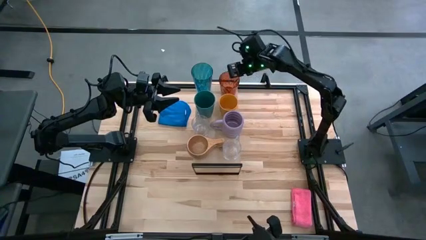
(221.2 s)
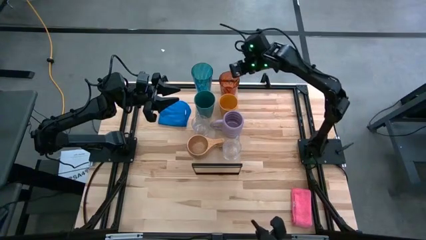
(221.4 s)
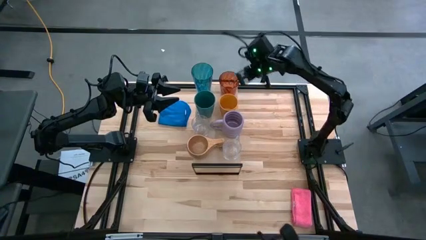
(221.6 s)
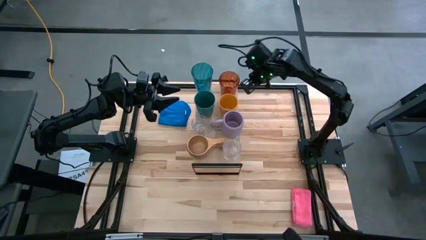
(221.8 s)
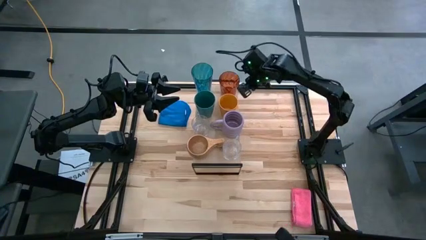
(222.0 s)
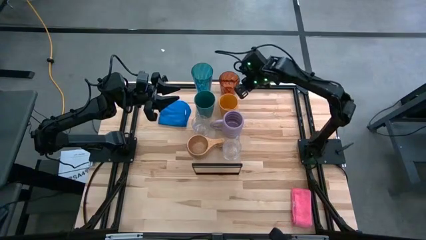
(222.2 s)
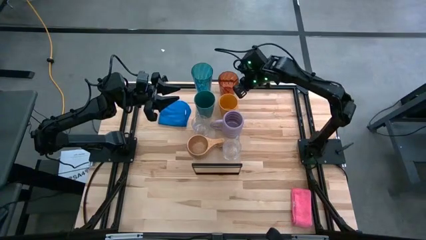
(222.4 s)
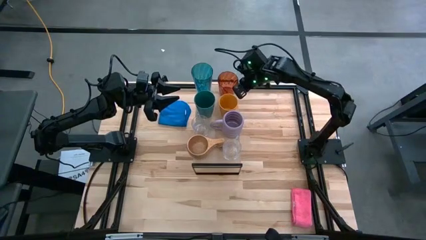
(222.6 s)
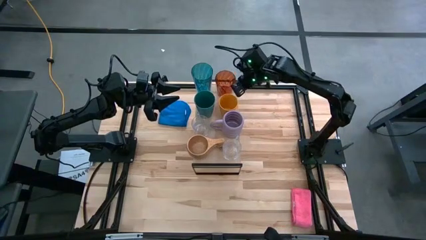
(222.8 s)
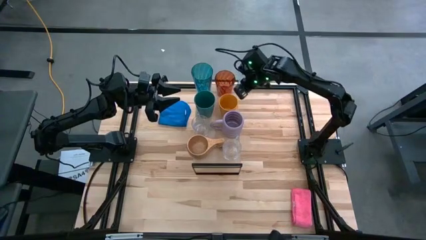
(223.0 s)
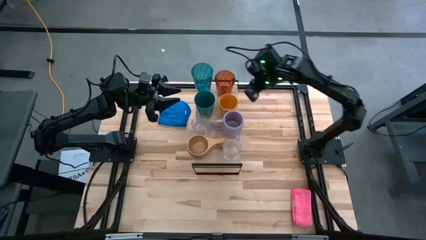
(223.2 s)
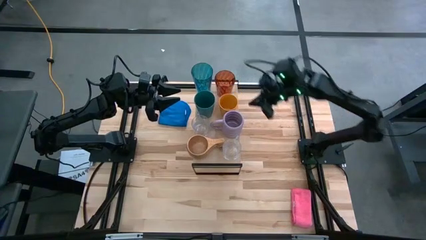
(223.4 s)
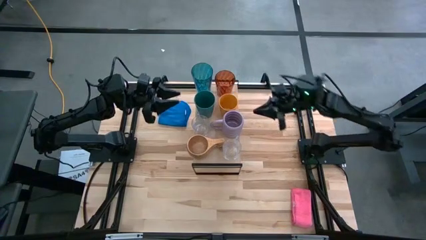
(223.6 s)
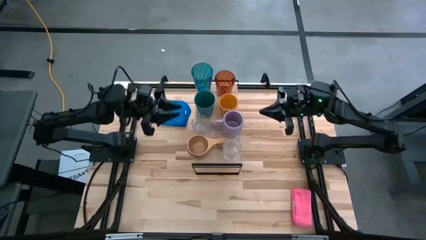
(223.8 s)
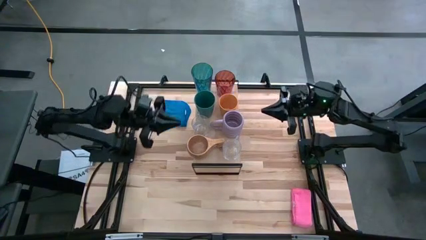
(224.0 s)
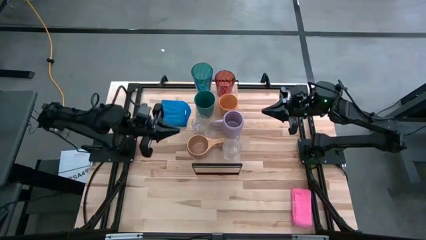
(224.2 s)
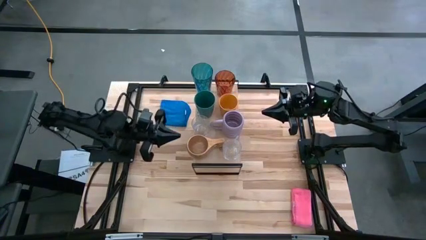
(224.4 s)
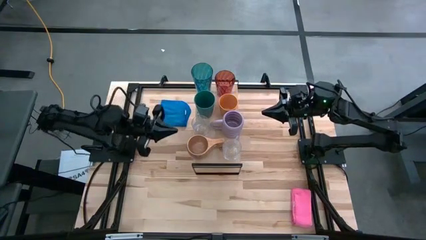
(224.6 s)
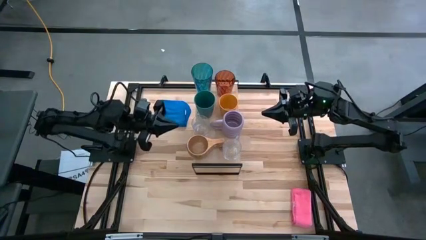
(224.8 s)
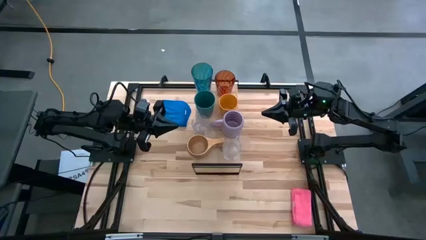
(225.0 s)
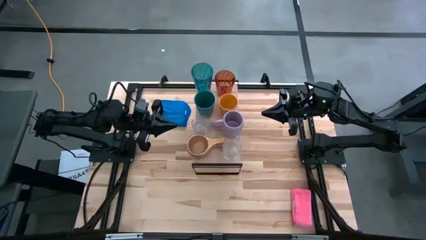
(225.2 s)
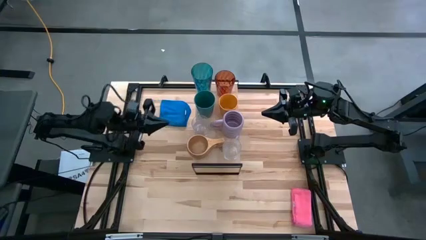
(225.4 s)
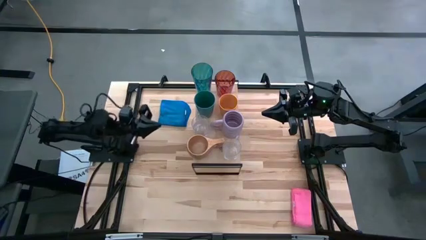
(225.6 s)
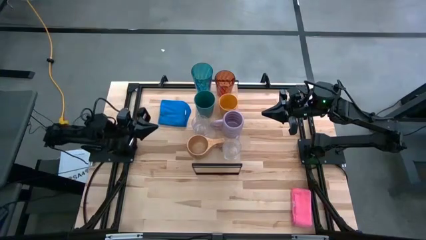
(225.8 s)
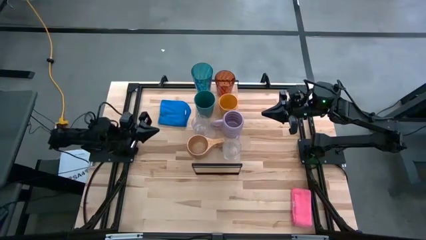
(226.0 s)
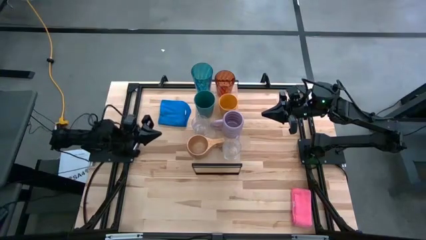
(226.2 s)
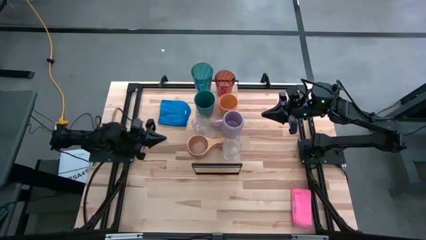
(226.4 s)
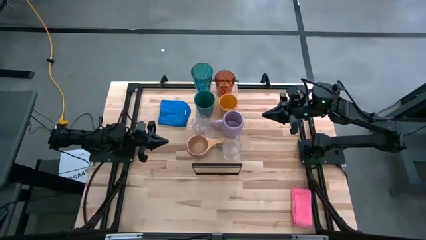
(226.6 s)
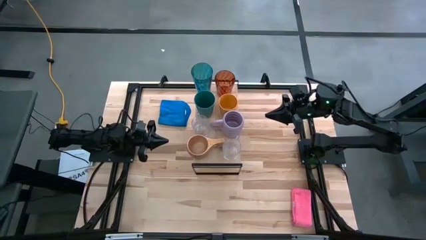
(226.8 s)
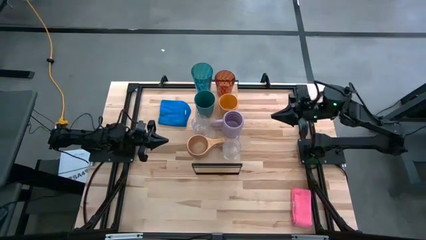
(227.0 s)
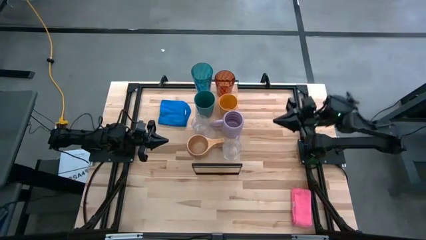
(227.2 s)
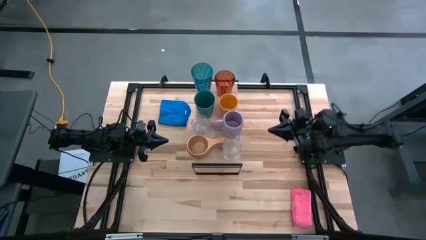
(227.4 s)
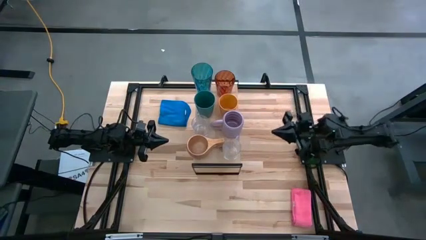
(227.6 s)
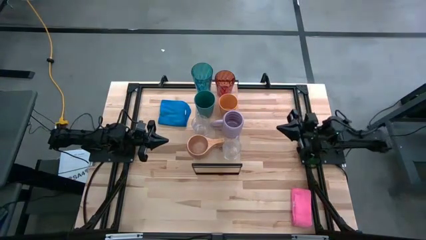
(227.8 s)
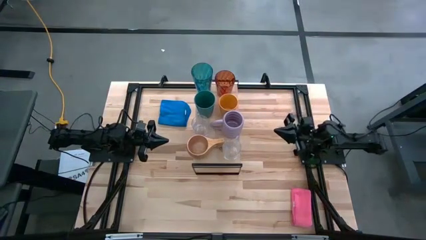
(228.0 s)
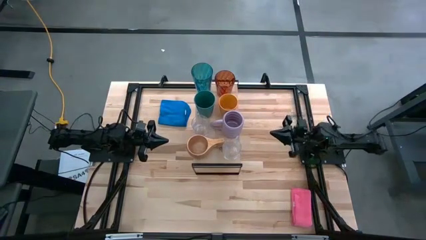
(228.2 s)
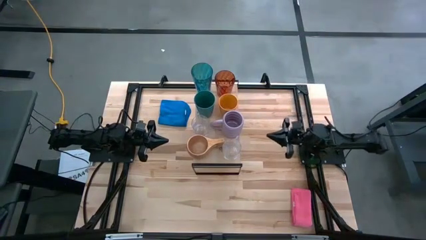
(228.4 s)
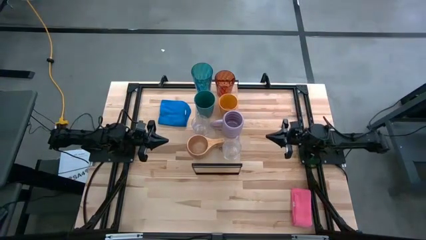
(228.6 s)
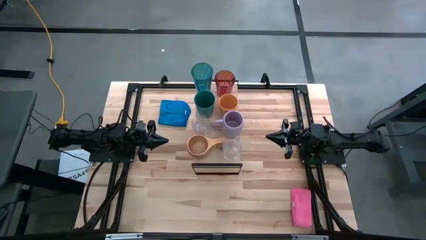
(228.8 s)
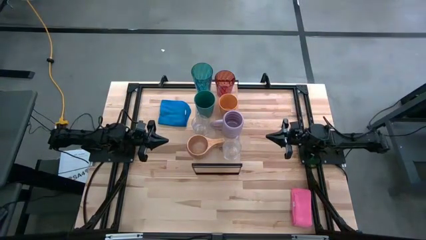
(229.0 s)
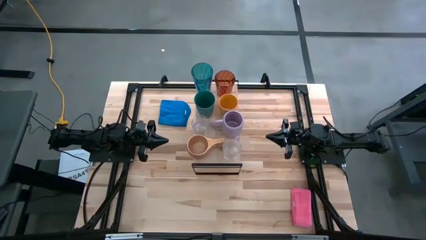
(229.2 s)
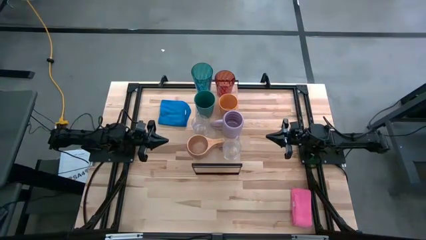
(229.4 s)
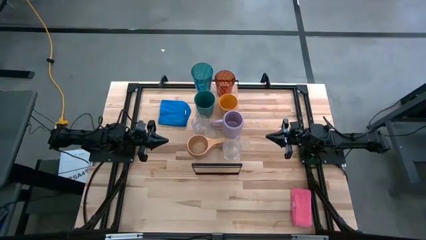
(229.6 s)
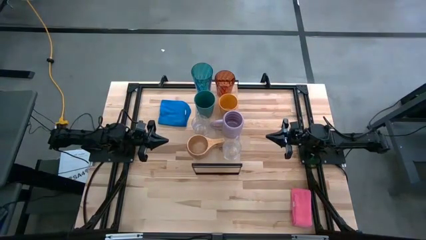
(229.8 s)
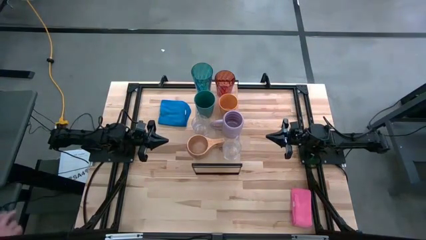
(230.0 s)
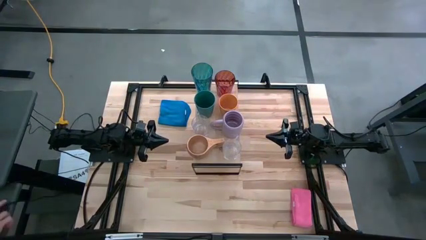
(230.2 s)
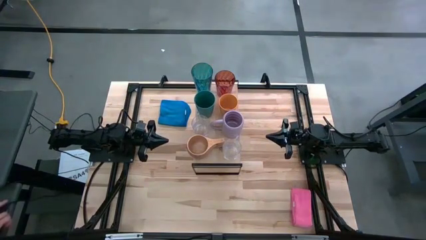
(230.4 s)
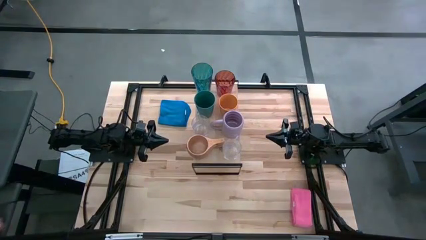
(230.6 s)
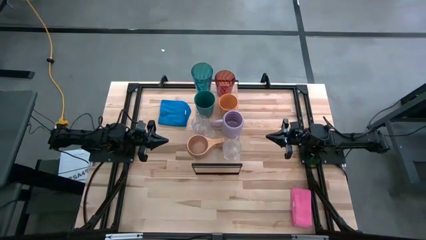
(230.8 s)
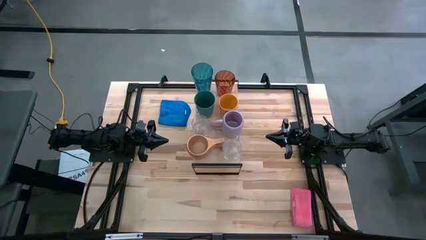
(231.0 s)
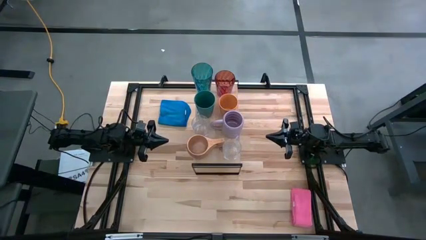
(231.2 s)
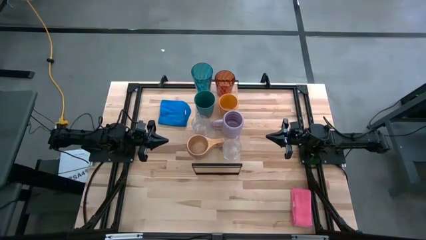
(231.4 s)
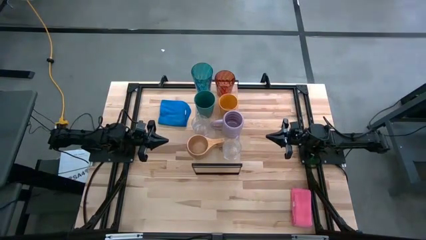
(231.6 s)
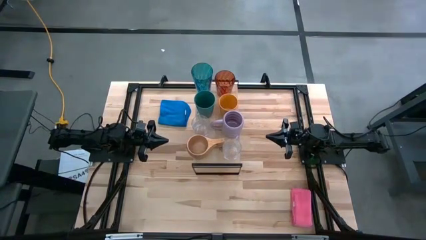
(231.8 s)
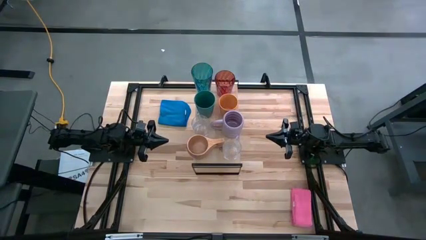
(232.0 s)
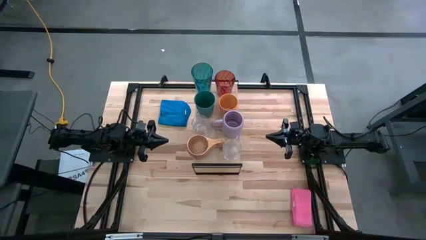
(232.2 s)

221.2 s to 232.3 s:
Task: Stack small to large cups/mugs on shelf
Return to Home Position

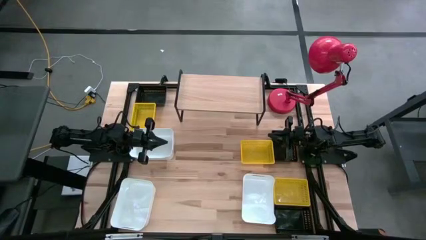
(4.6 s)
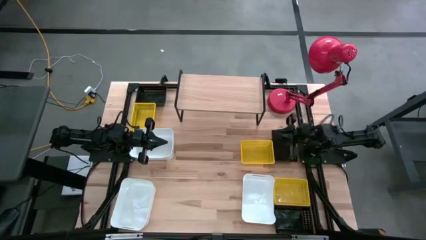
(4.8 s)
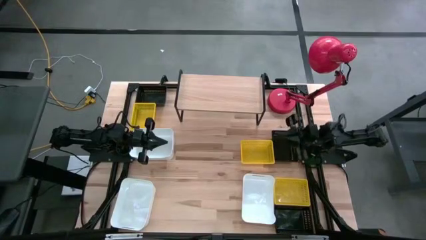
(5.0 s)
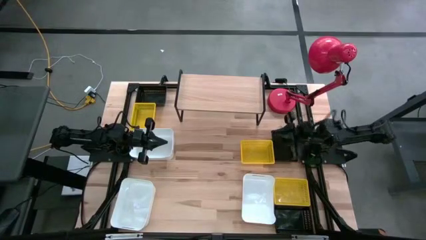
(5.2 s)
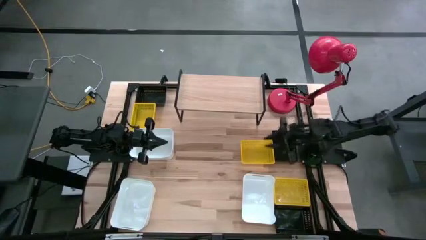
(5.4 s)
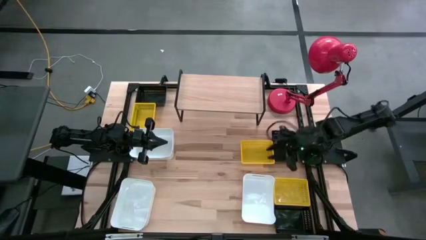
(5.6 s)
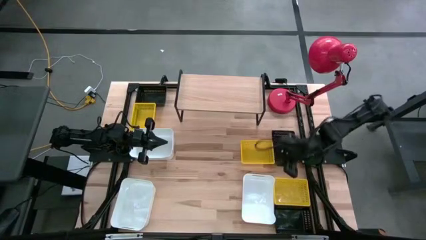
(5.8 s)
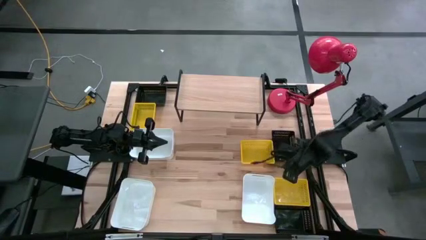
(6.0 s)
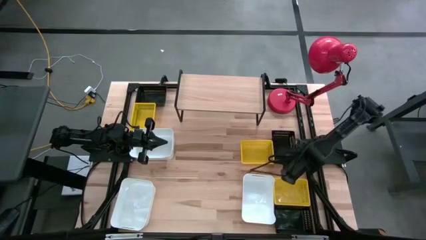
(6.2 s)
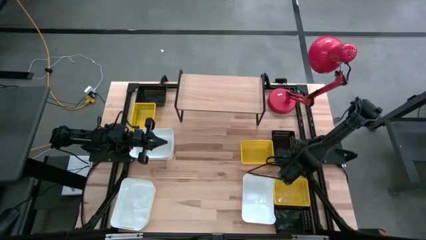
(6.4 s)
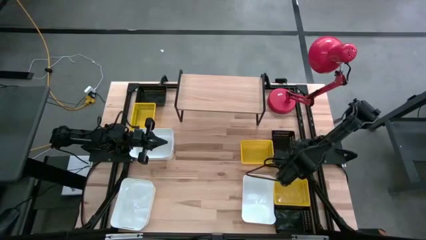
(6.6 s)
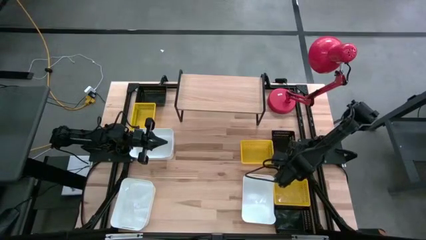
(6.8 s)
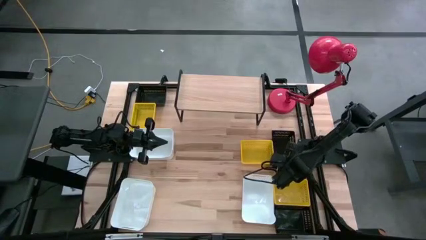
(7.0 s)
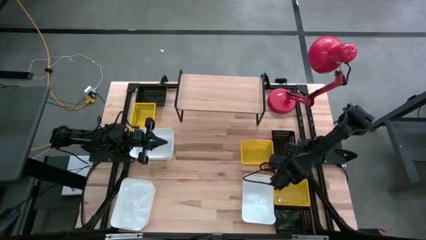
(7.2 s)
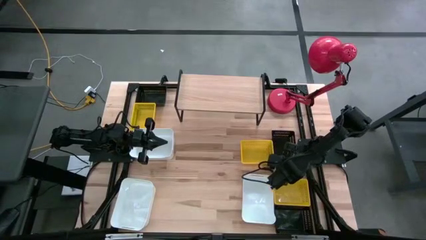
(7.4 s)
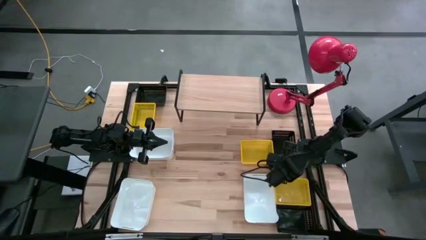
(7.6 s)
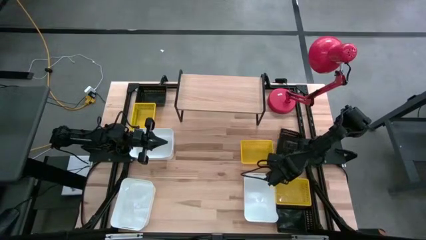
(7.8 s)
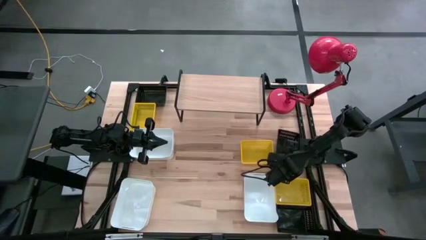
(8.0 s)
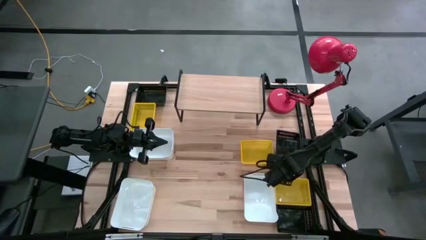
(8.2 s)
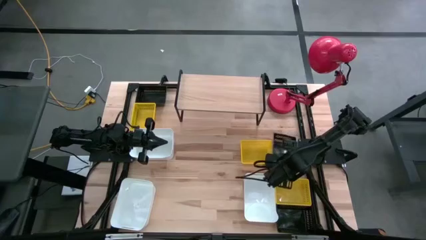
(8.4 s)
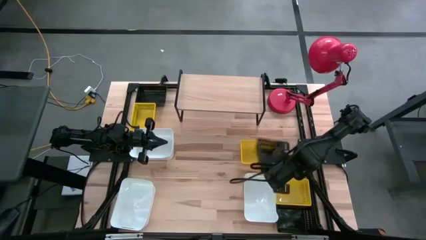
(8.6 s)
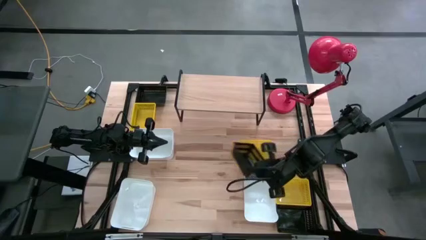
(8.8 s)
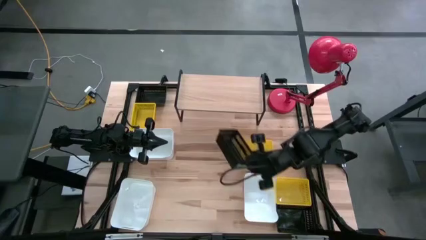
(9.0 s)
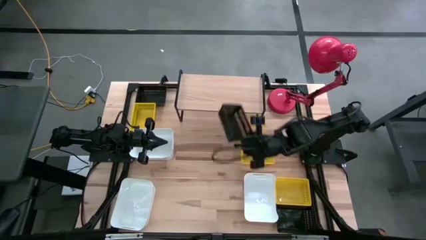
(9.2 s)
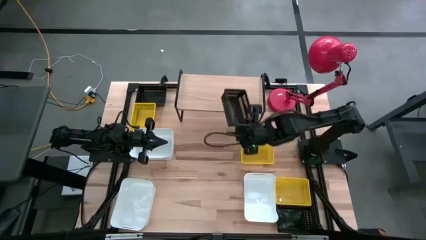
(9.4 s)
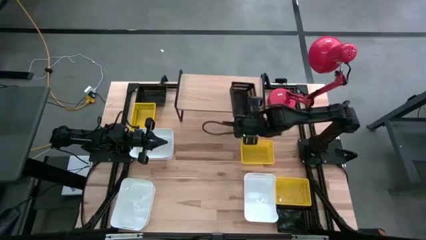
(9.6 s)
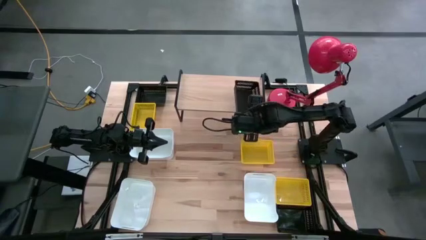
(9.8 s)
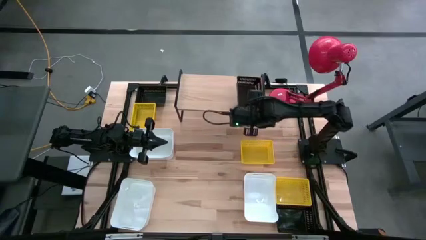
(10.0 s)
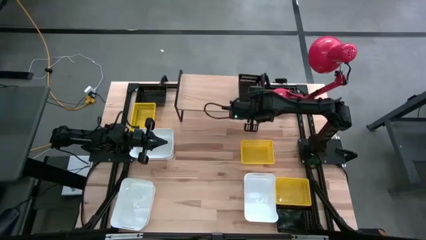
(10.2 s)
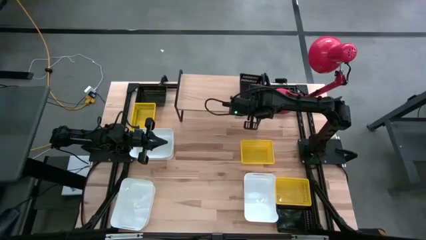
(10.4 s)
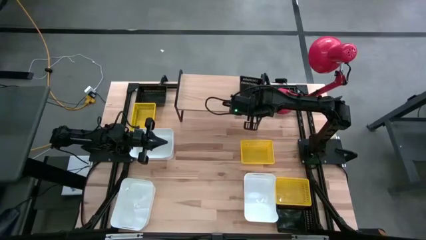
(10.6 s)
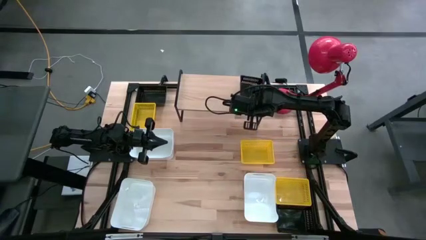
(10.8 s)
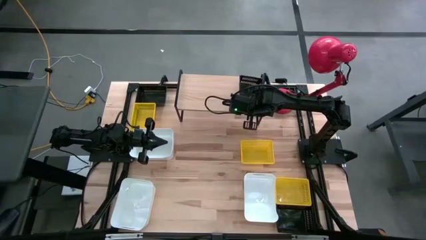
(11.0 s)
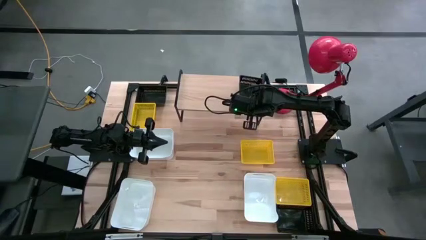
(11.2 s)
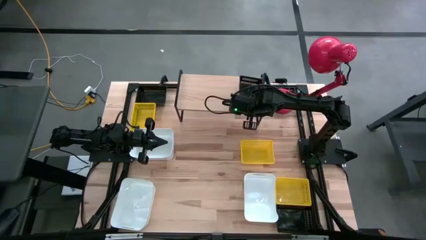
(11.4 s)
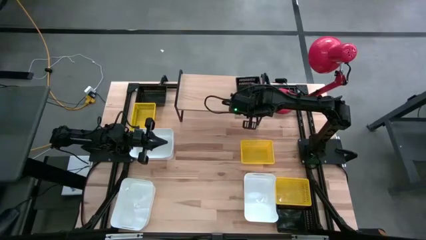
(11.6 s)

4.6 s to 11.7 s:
Task: Stack baskets on shelf by color
Put the middle right black bin on the shelf
